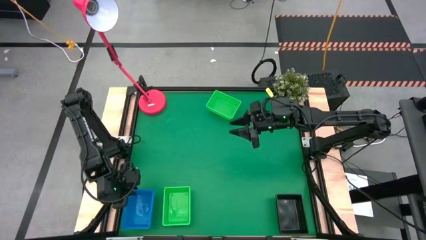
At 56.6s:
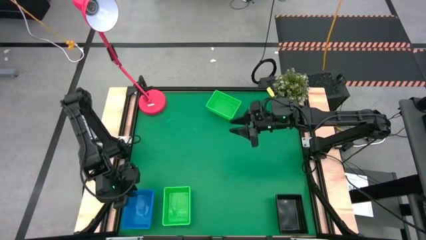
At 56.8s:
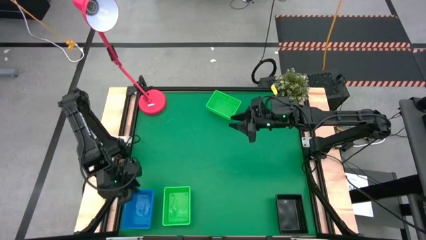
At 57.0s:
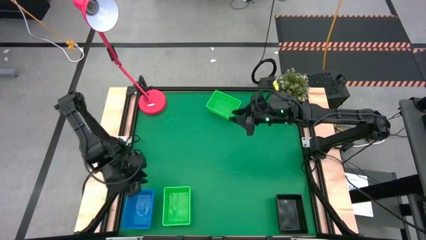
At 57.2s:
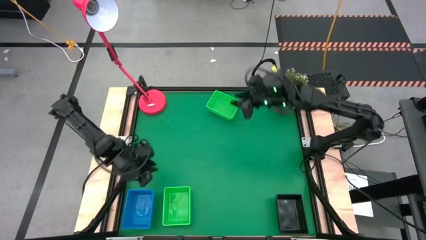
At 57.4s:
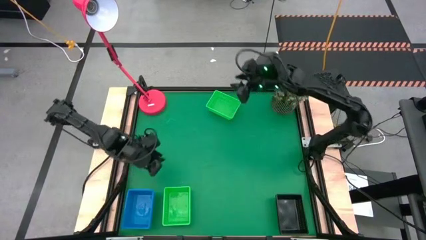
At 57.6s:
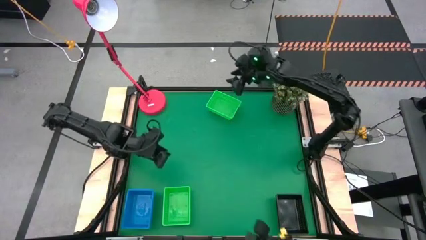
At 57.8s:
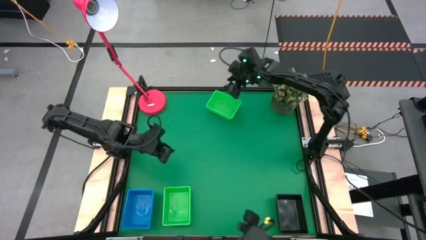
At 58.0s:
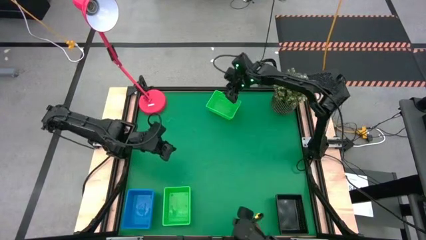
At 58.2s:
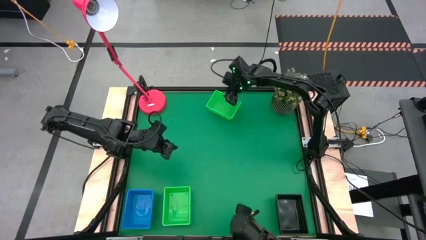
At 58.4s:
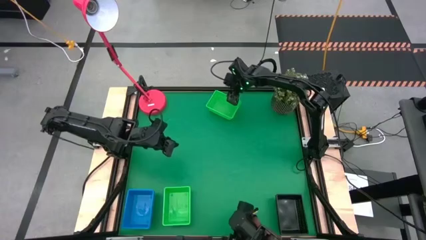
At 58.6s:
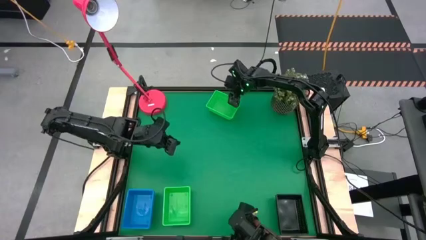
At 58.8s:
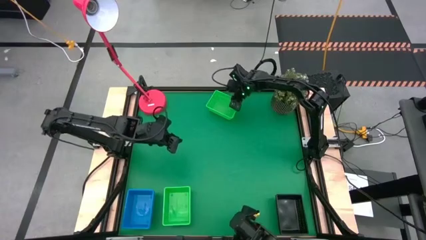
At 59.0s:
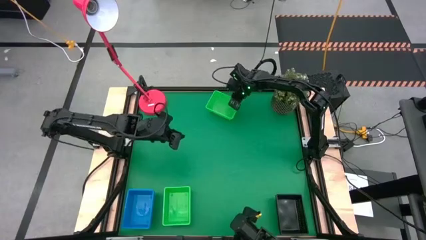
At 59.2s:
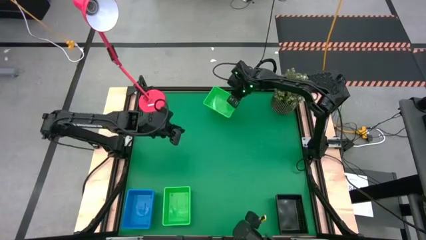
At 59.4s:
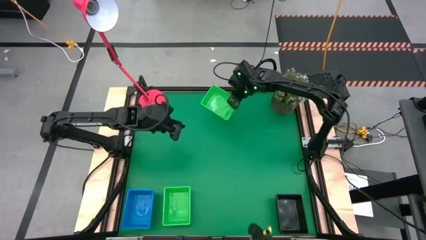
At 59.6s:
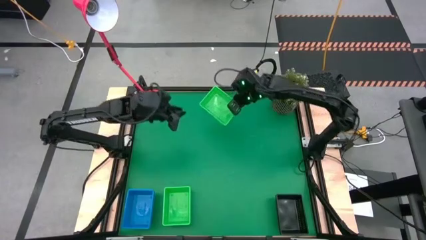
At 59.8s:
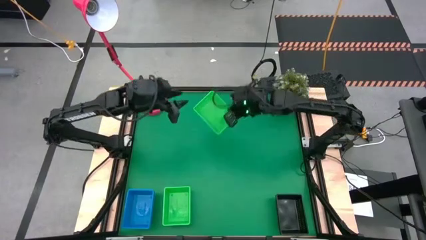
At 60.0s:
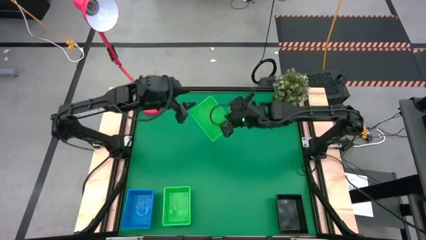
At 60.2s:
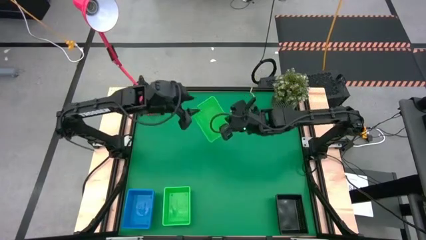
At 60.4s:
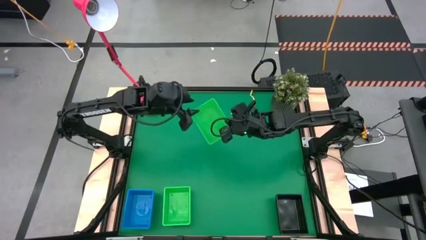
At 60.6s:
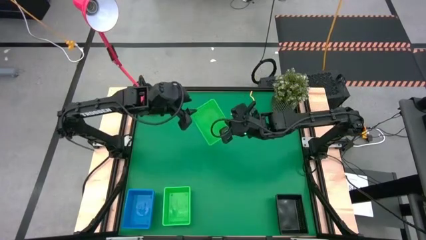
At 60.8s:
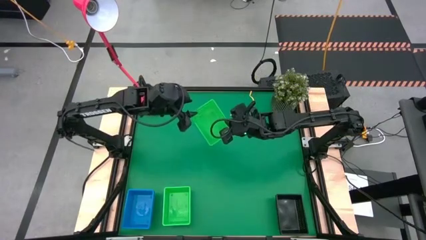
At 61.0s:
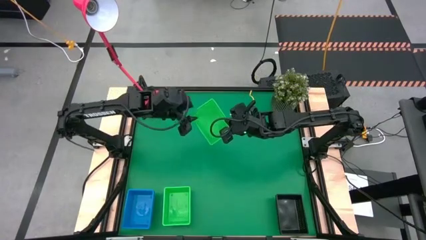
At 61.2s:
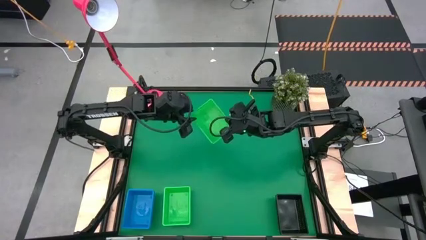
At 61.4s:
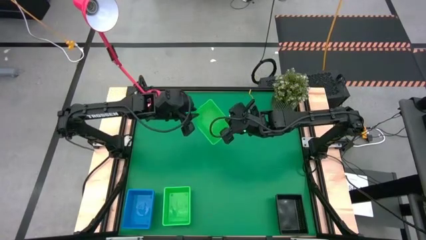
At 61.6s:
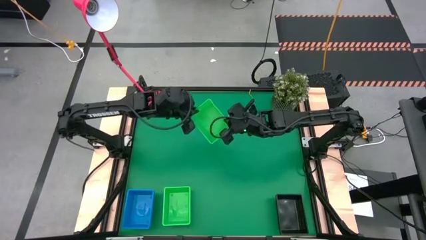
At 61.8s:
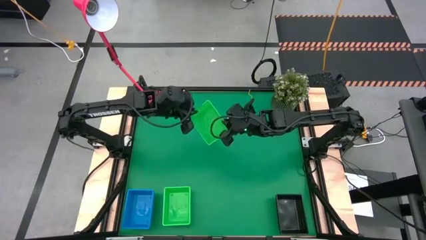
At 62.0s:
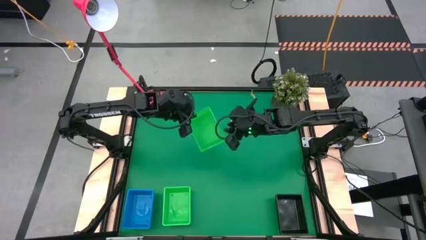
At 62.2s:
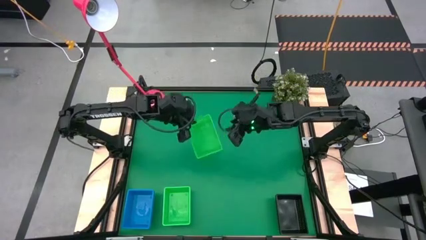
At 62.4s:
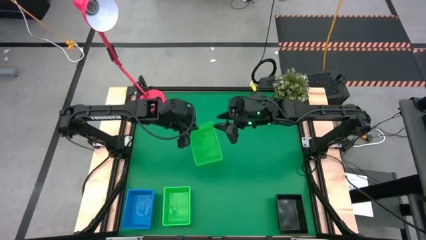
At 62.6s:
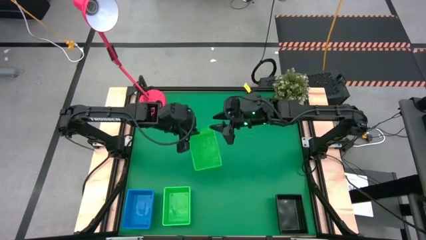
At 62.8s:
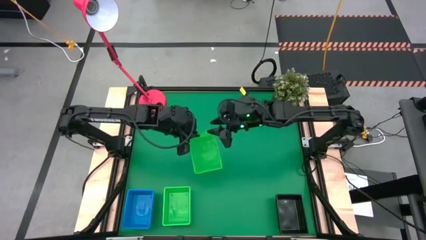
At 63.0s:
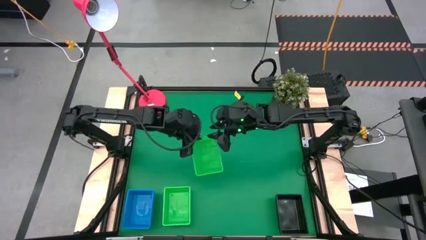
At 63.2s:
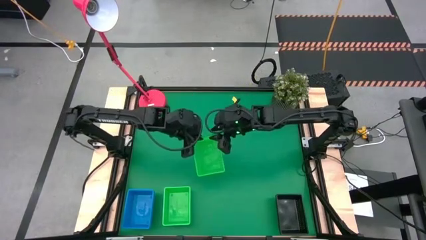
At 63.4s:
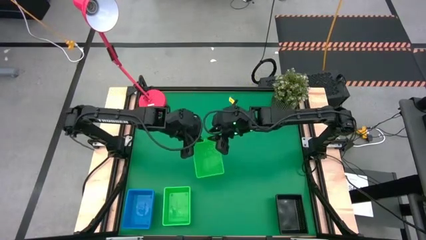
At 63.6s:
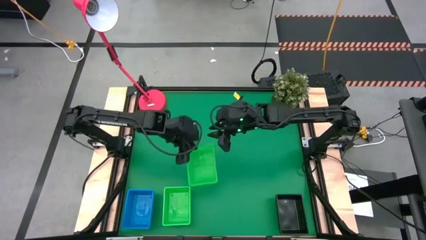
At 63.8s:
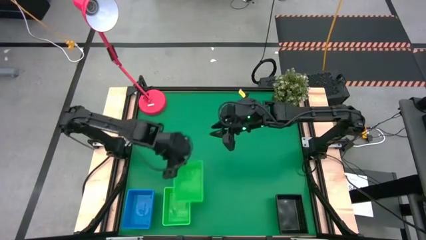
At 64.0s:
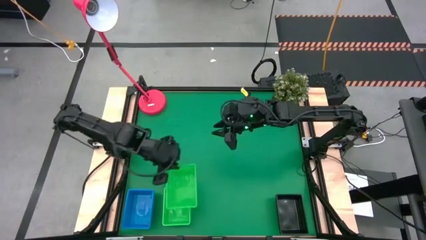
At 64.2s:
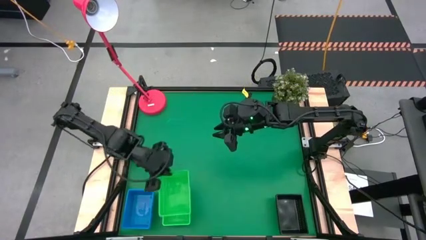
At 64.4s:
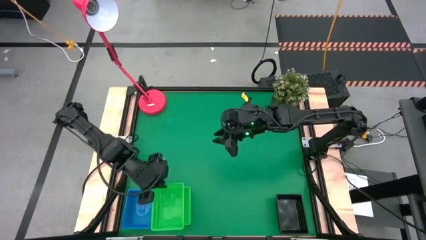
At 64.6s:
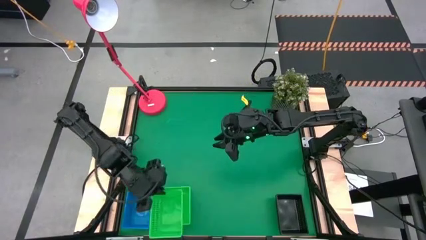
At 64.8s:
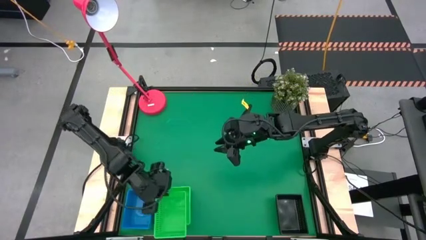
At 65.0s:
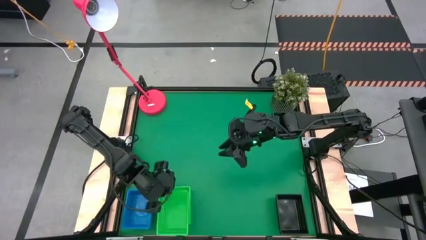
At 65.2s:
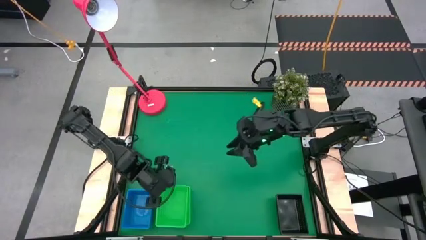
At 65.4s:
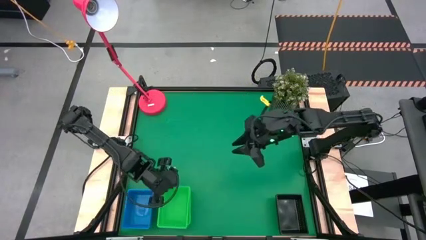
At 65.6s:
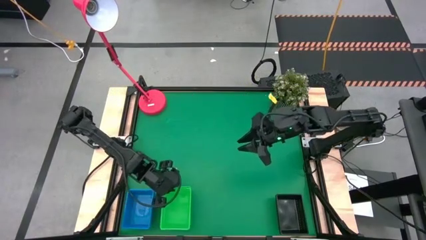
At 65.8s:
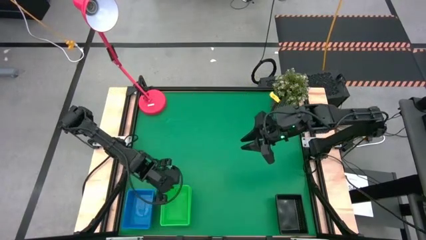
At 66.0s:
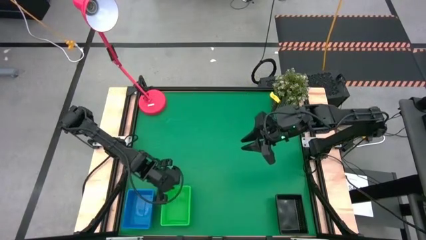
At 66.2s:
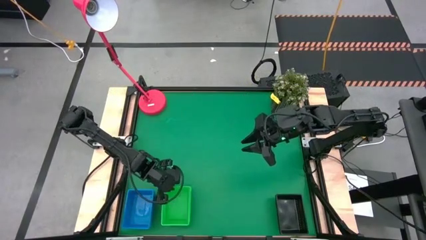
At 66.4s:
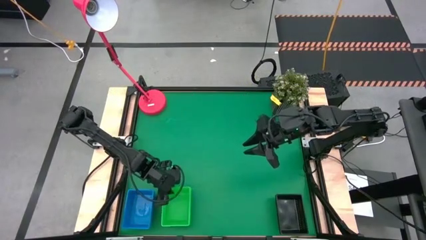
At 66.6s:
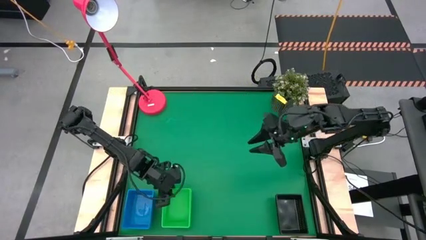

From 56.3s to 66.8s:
Stack the top green bin on top of the bottom green bin

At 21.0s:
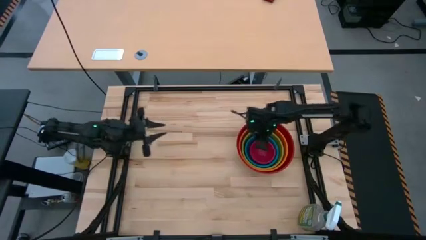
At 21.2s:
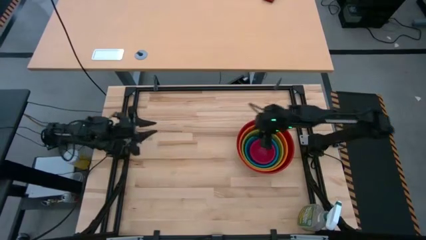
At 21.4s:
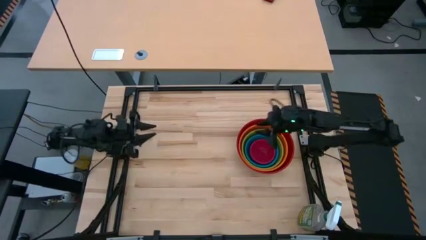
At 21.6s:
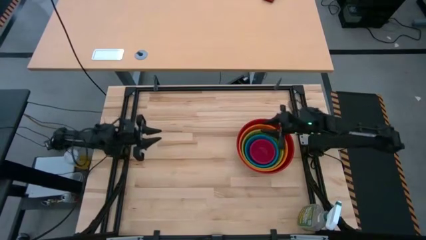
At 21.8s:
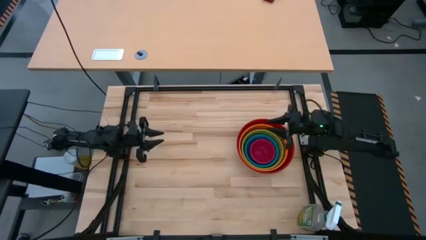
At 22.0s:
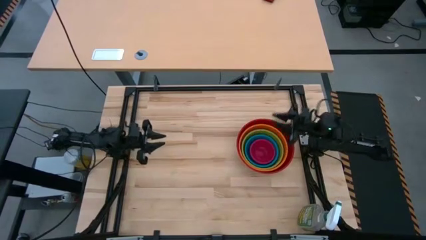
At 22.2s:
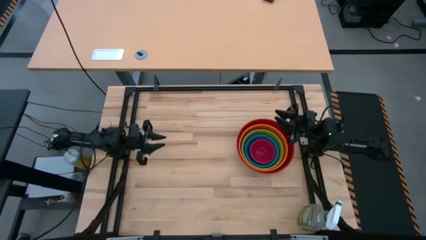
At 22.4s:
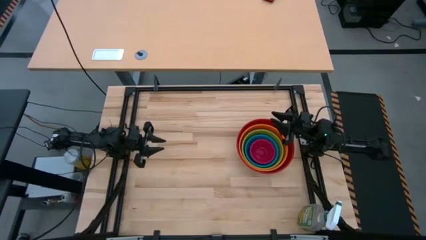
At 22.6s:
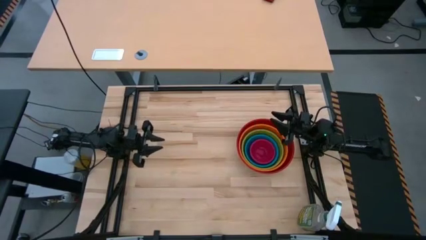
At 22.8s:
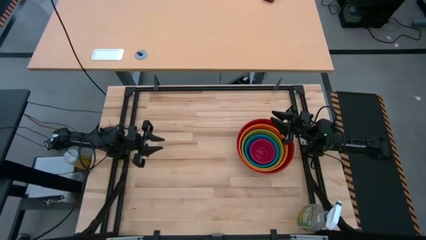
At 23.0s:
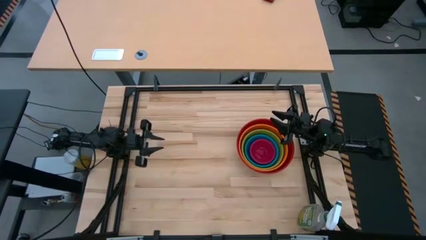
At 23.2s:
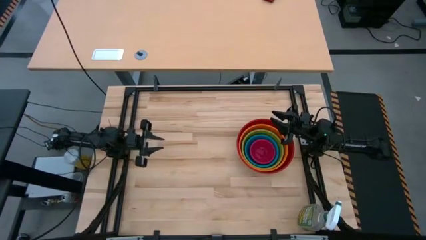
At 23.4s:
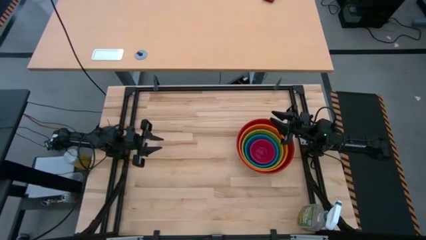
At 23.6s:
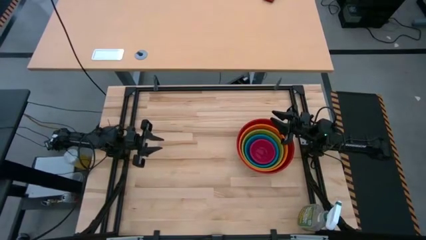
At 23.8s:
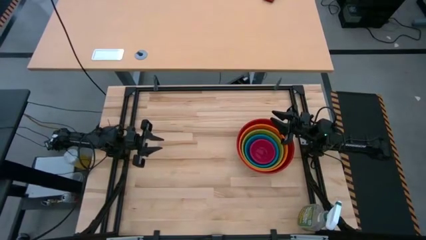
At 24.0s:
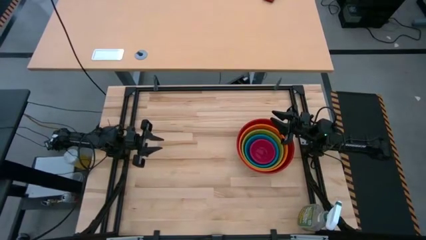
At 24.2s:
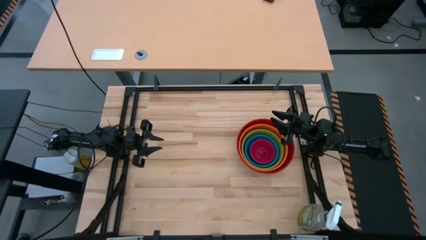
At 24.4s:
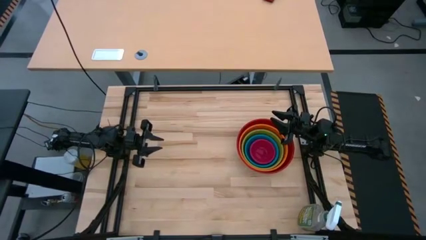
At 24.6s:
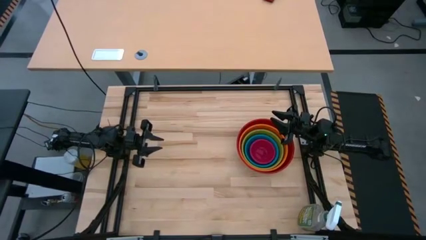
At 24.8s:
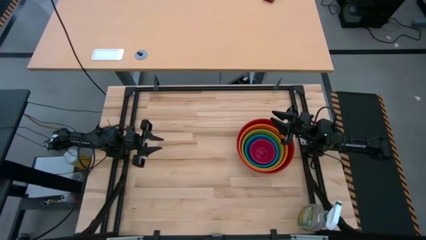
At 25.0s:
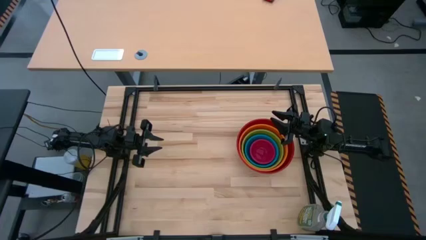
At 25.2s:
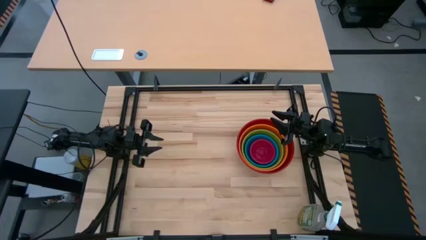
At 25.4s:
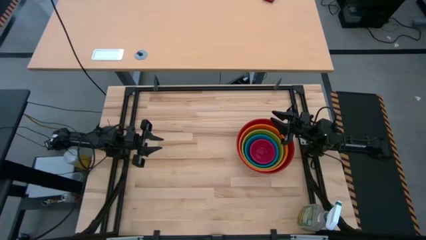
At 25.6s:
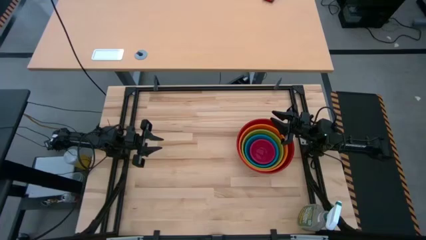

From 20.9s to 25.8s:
Return to Home Position
